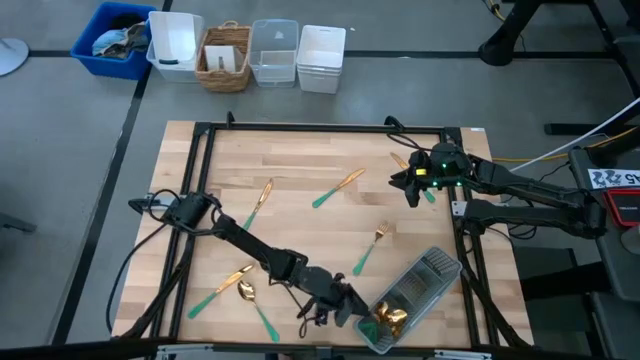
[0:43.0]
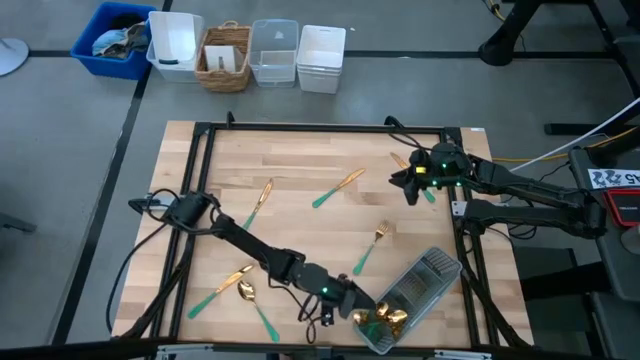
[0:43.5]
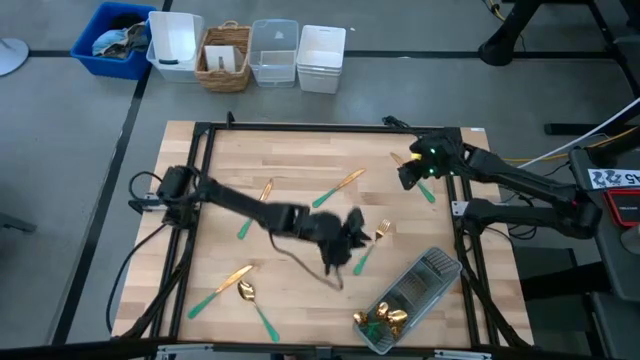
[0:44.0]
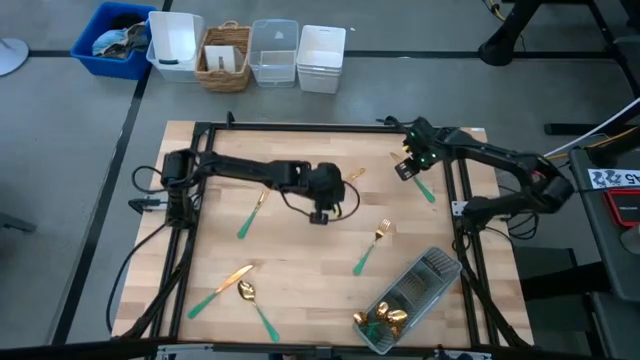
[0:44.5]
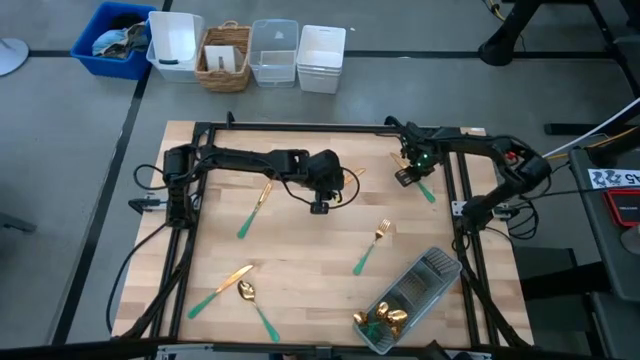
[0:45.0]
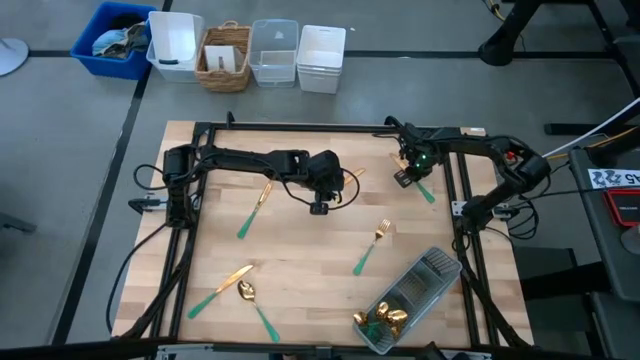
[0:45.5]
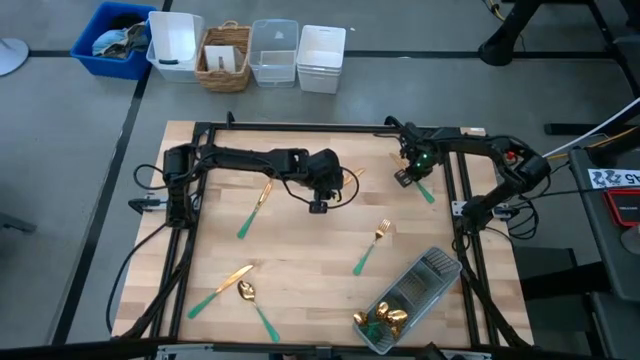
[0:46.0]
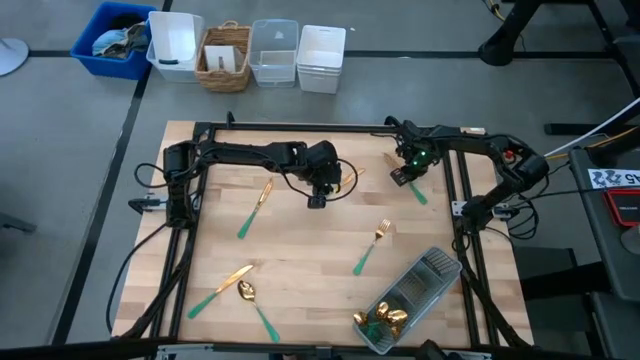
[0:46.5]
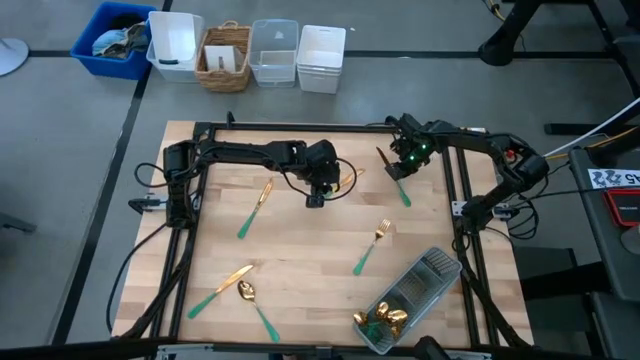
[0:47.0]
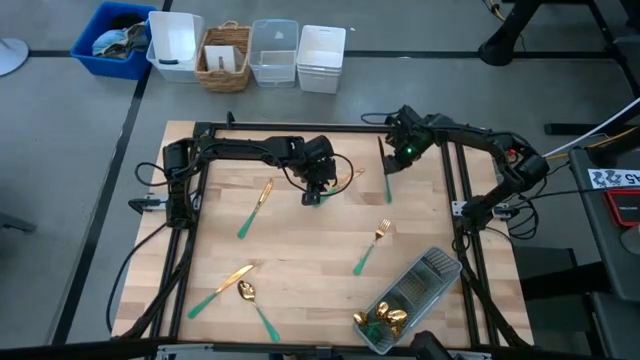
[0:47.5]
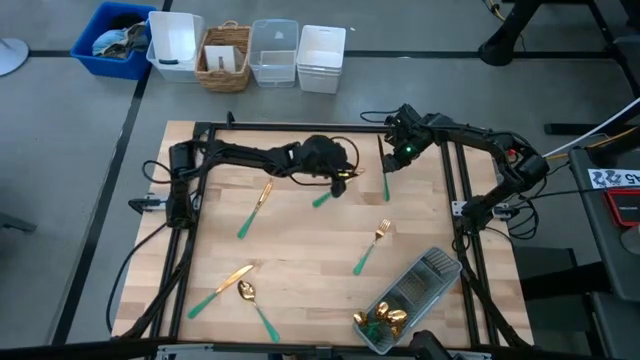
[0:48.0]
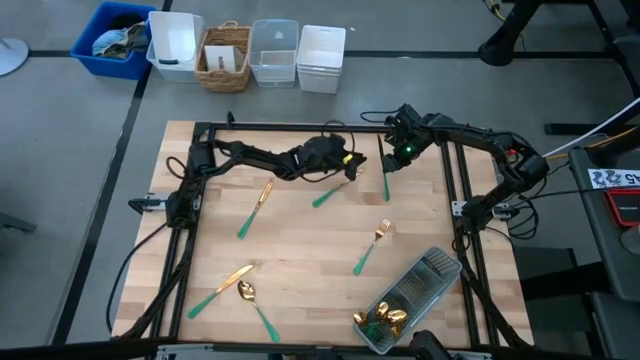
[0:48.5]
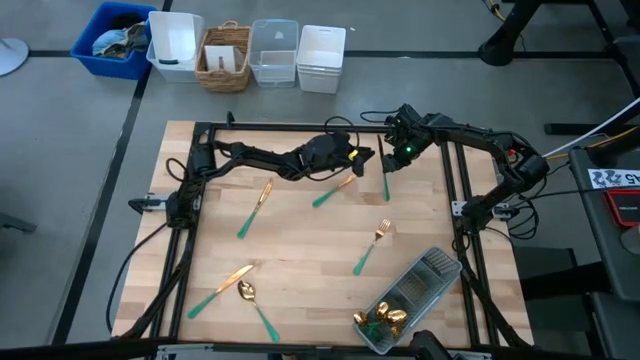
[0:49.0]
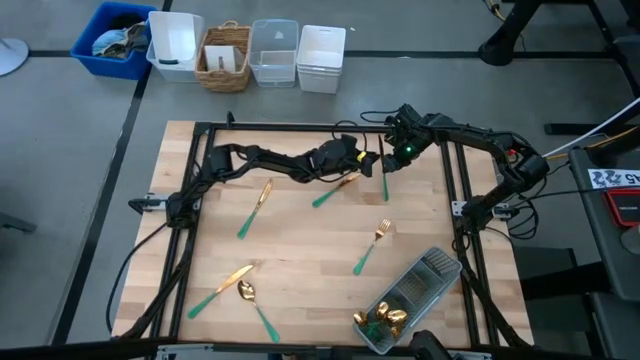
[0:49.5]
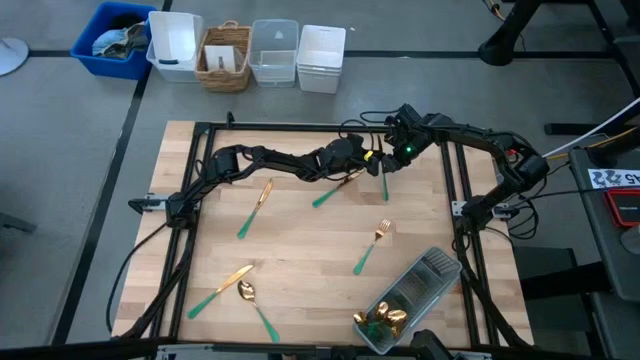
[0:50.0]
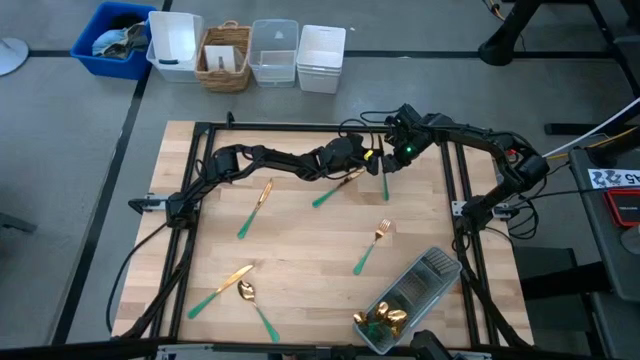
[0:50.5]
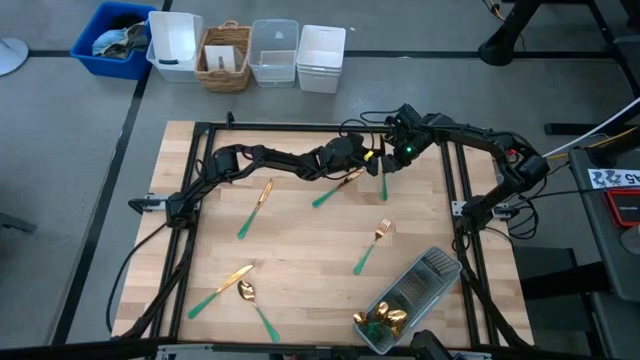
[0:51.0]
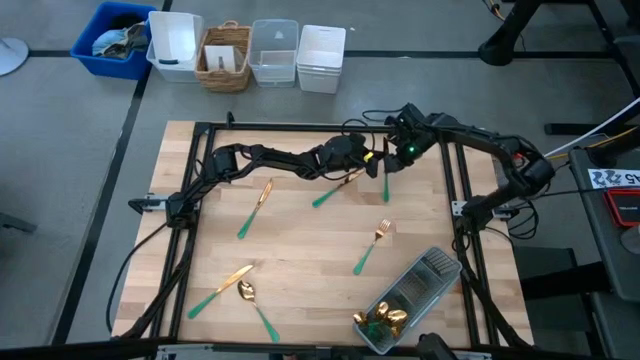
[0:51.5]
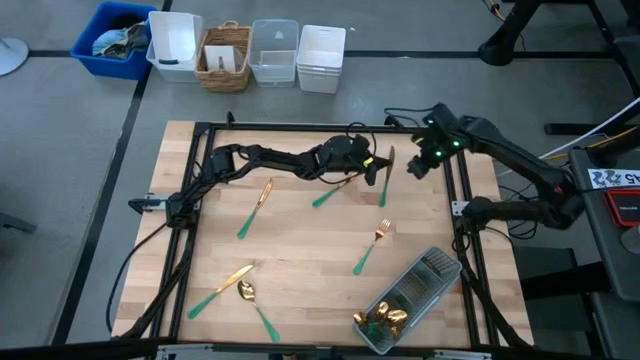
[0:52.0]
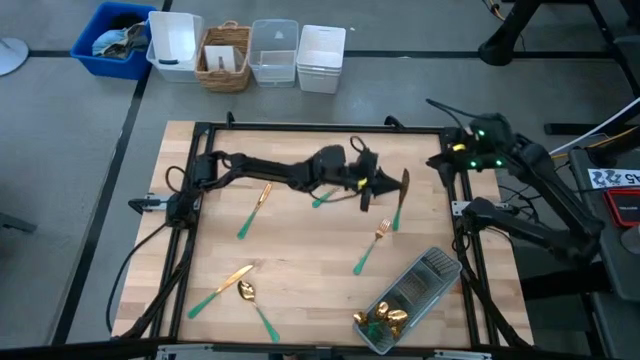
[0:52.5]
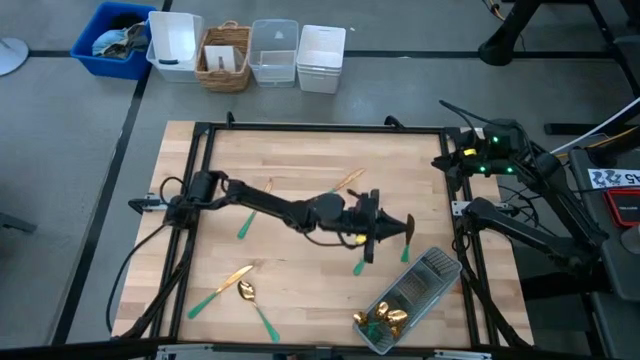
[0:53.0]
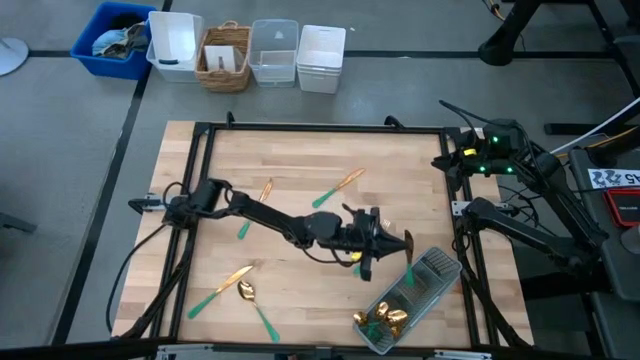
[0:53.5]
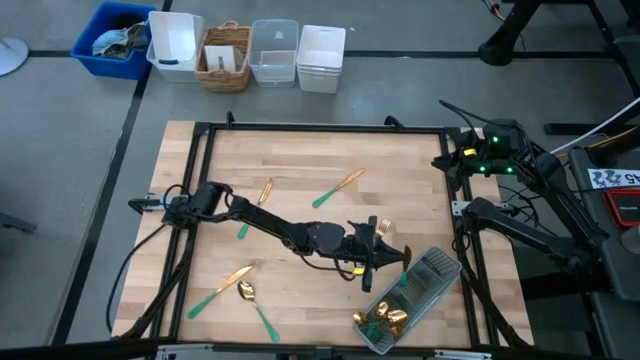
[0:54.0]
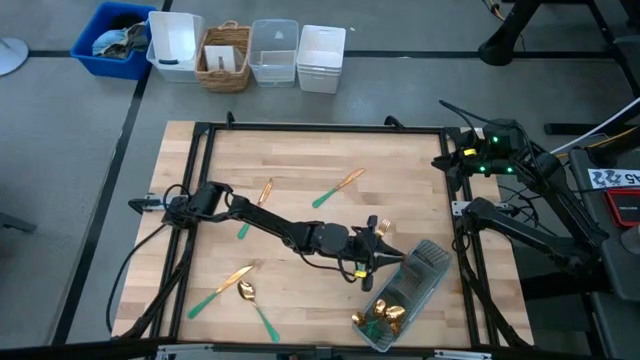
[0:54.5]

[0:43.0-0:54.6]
Task: Sort silverware
Put the top right table knife into the utensil organizer

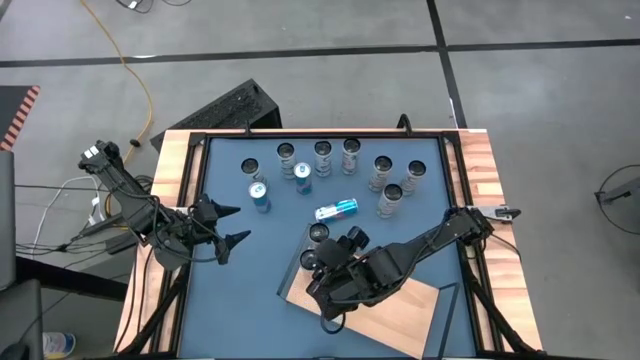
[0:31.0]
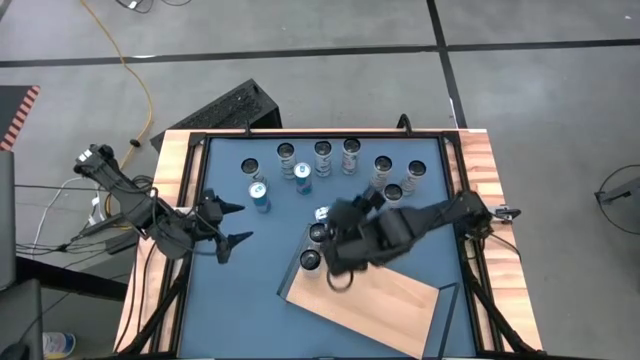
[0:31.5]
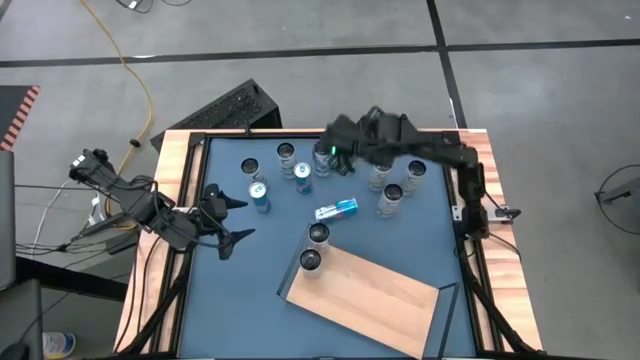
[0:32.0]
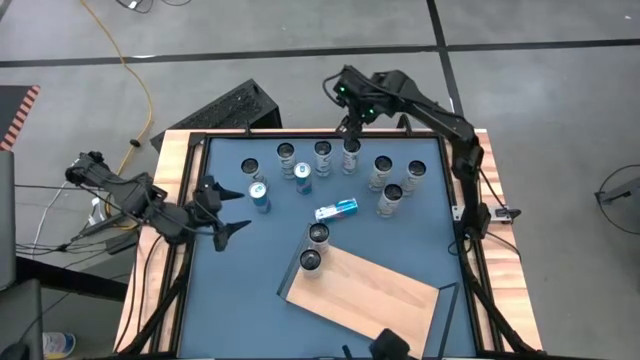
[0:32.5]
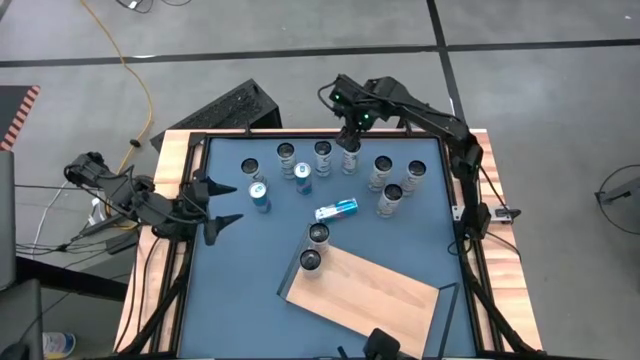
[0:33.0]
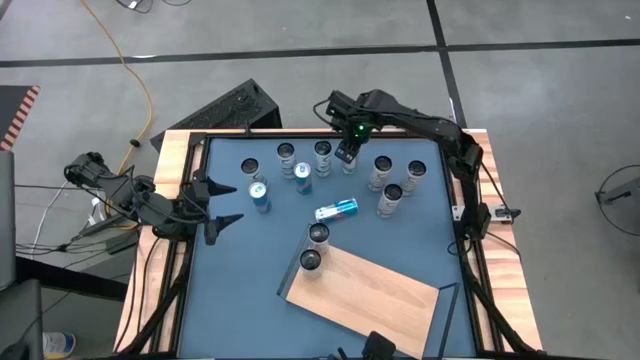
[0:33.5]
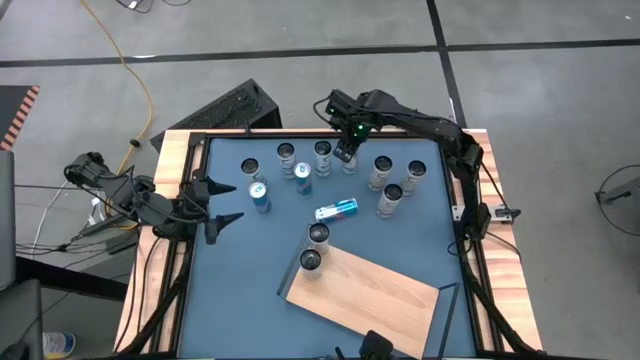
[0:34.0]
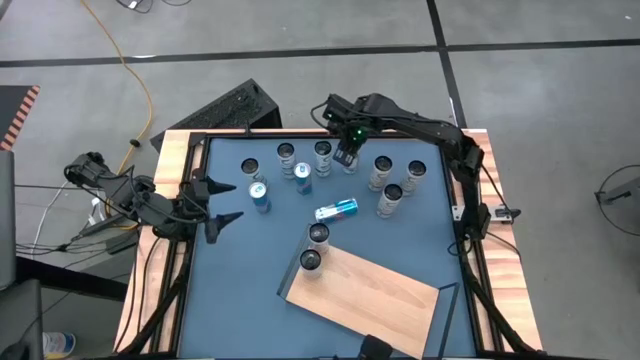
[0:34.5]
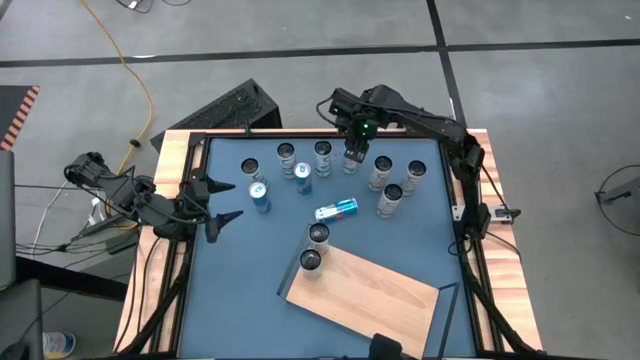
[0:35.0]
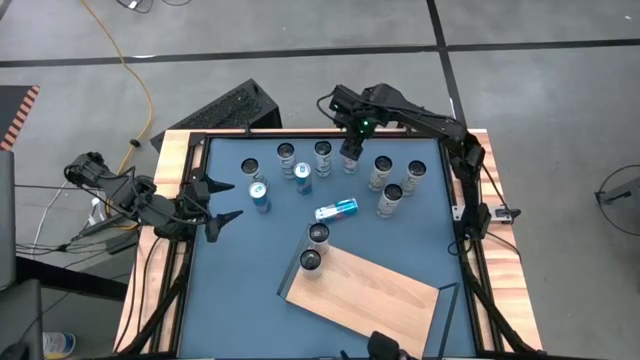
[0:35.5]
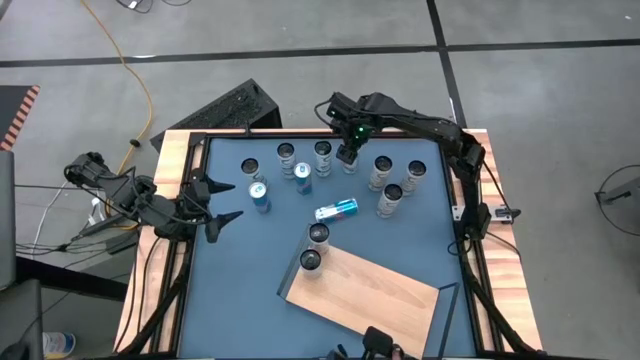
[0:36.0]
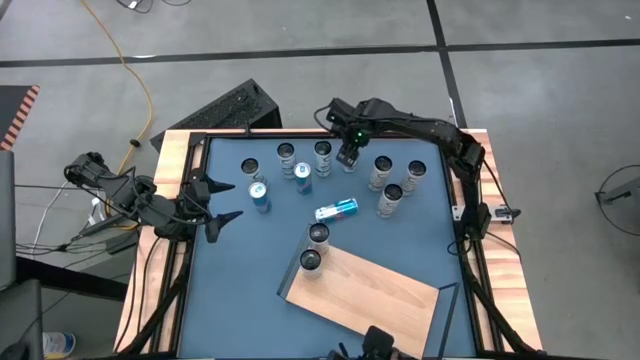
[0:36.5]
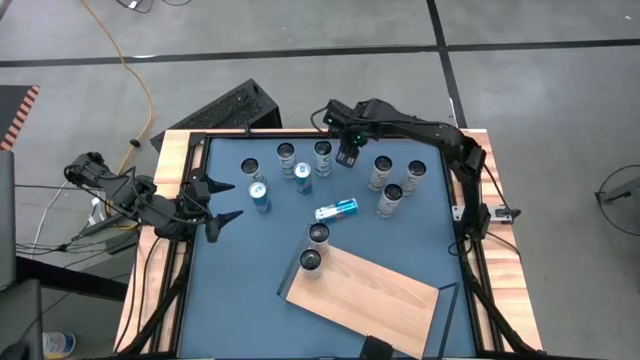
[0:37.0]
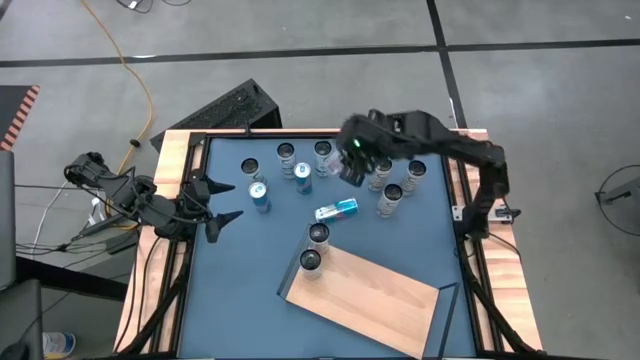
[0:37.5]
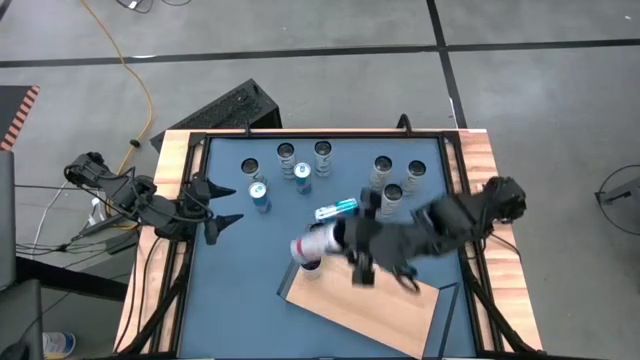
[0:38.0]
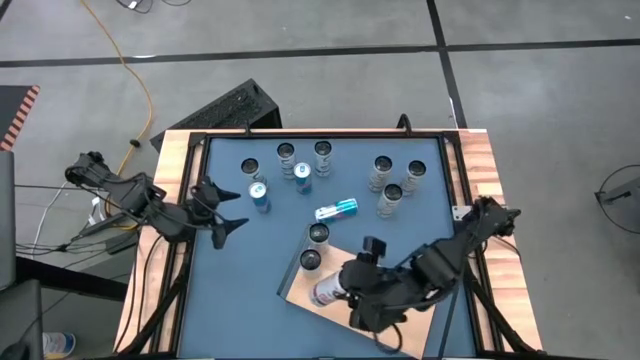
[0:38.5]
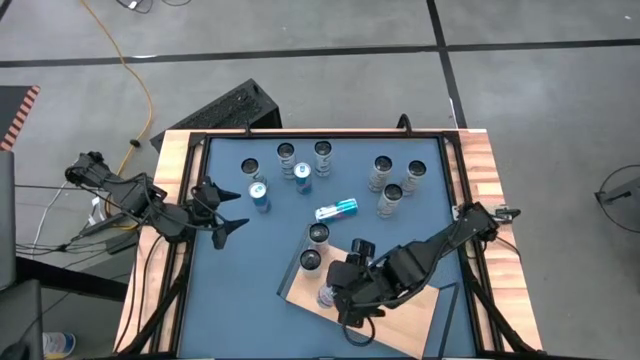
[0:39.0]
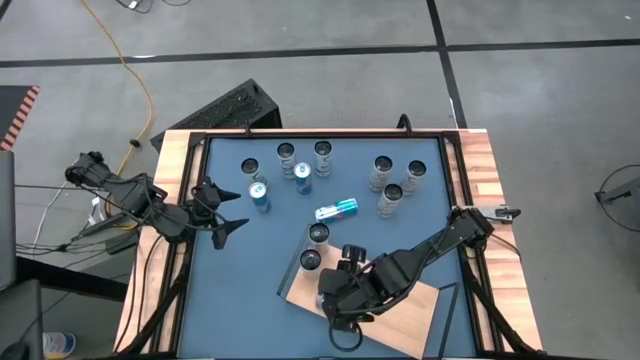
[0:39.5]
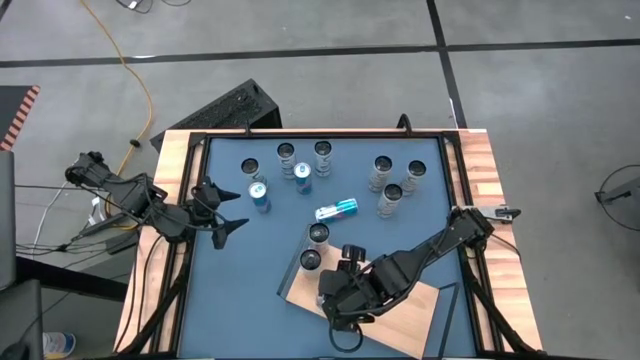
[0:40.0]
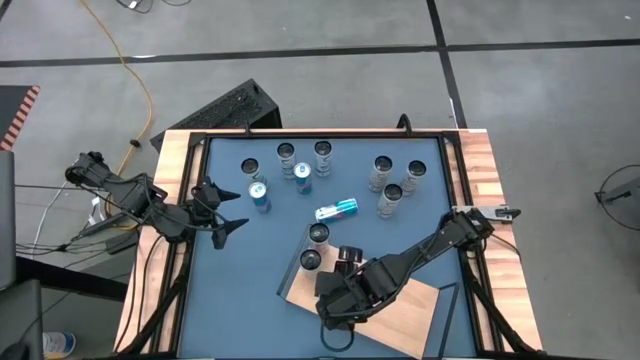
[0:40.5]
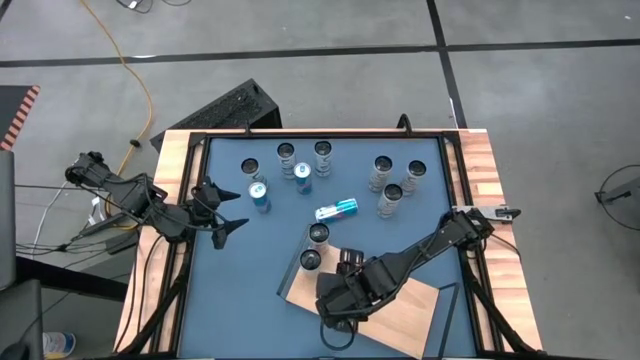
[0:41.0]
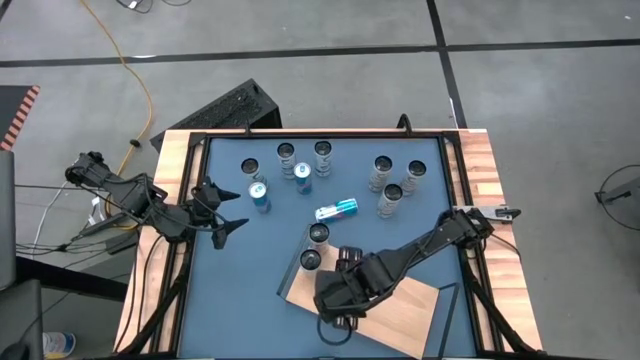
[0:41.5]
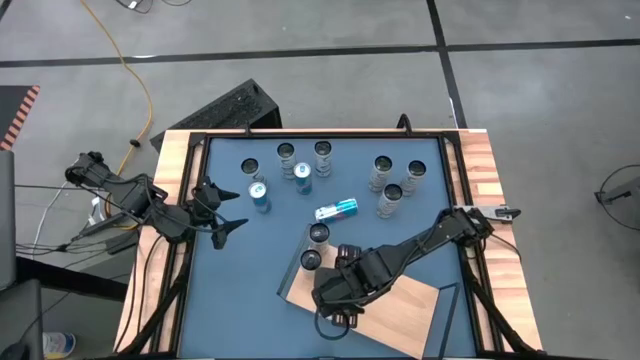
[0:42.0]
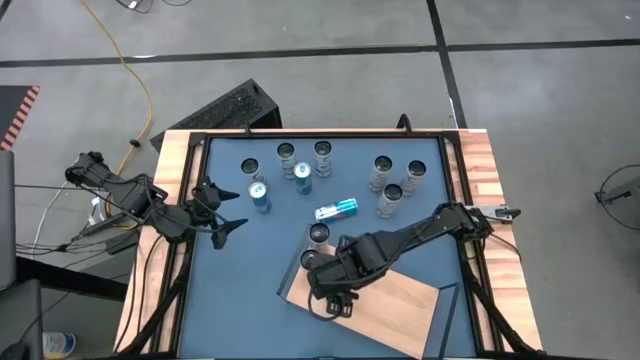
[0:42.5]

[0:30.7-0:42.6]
Task: Place canned beverage on shelf
Put the white pink soda can aligned with the other white pink soda cans on the shelf
